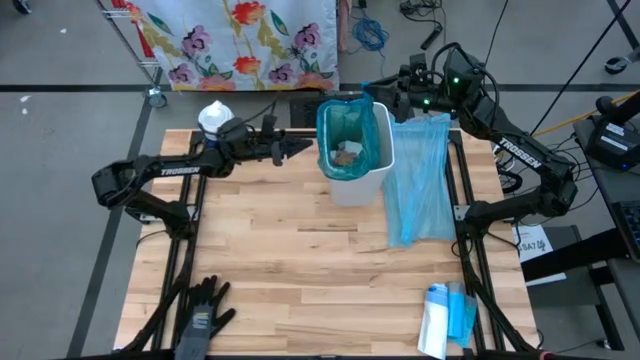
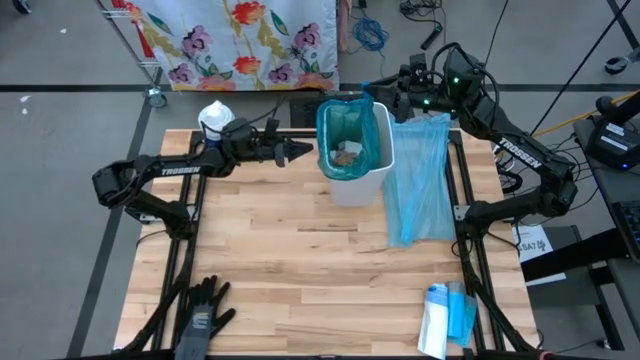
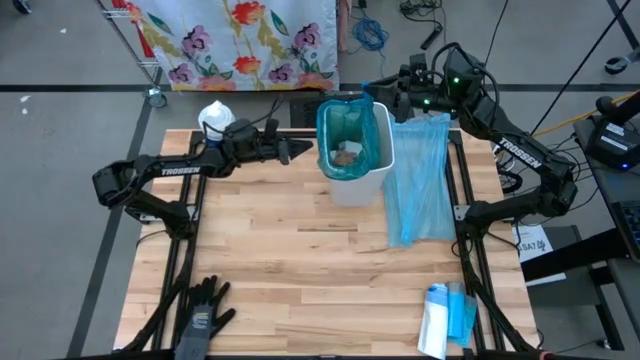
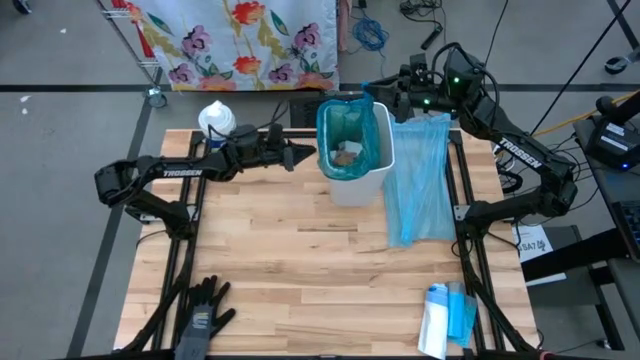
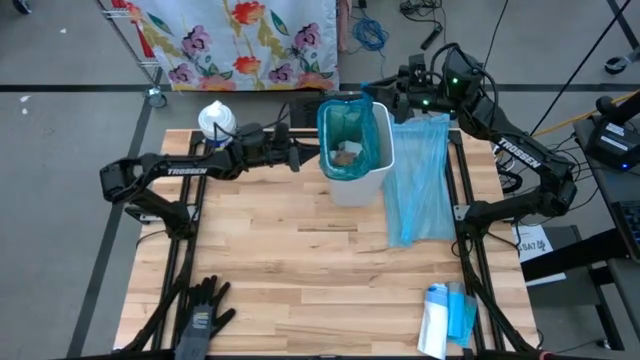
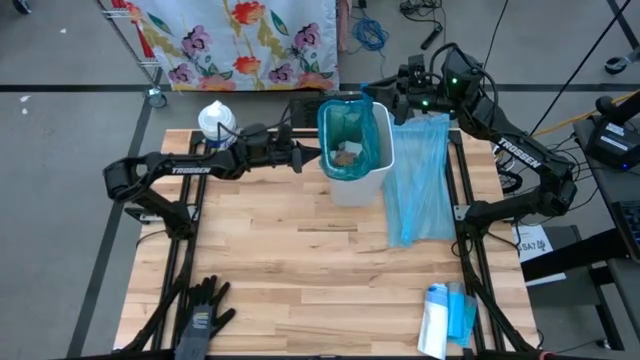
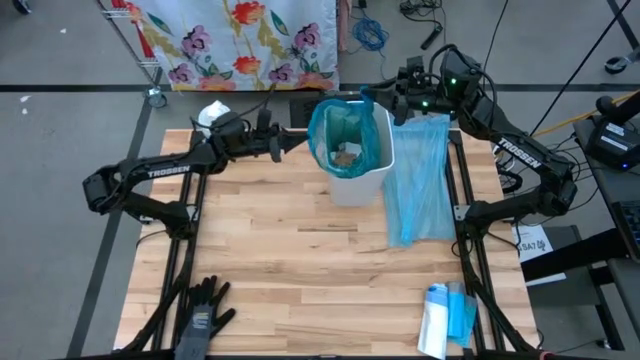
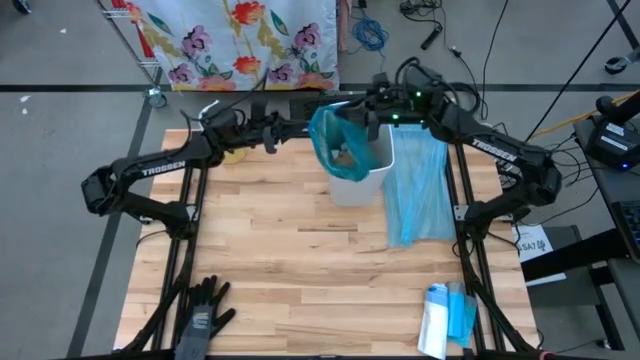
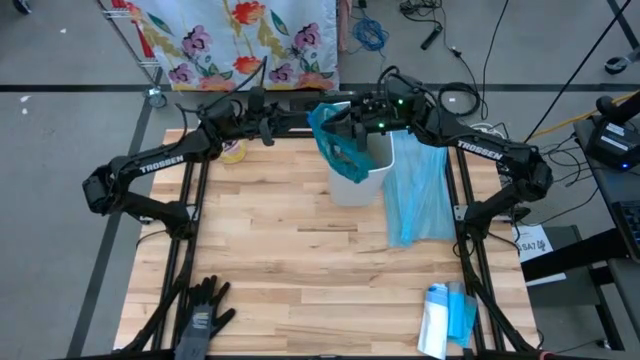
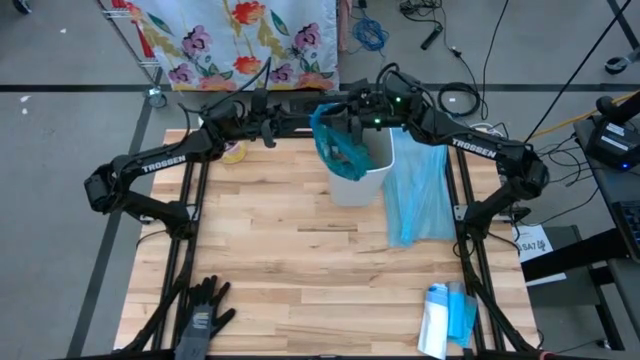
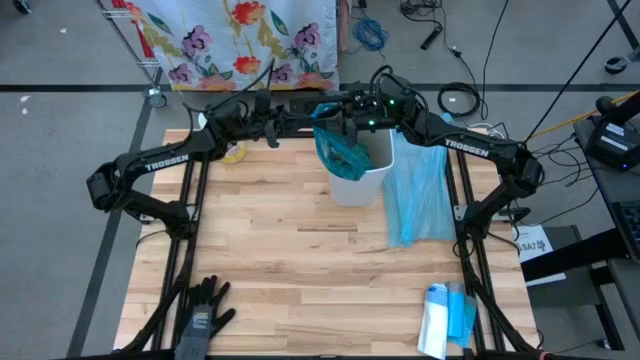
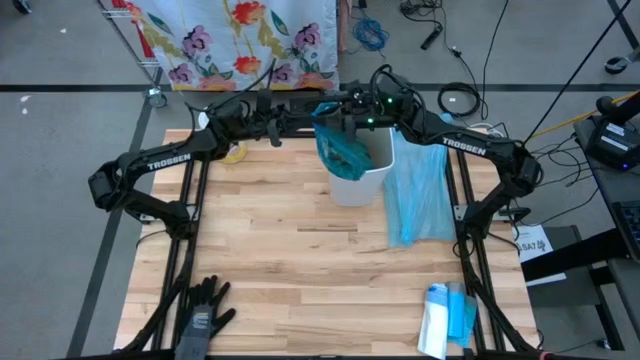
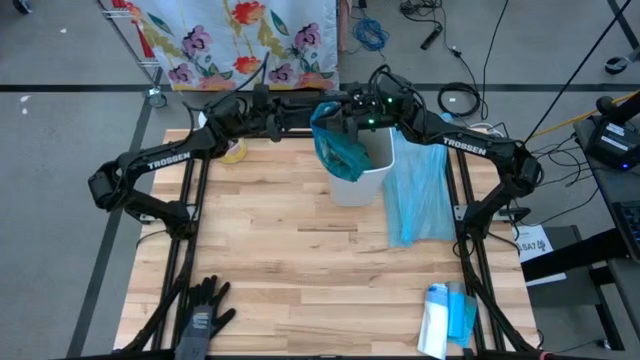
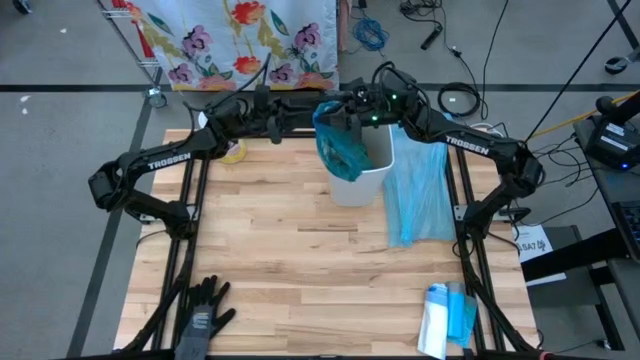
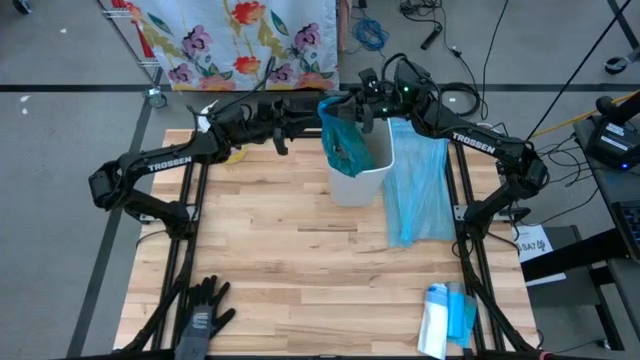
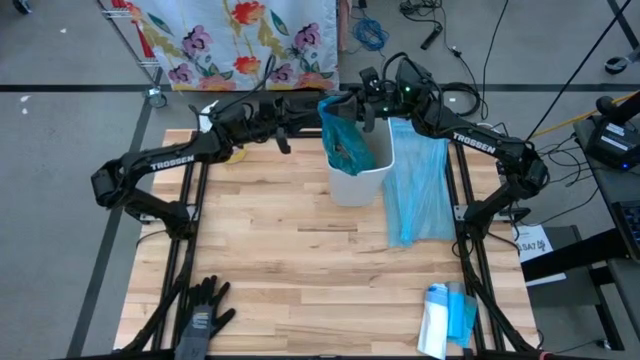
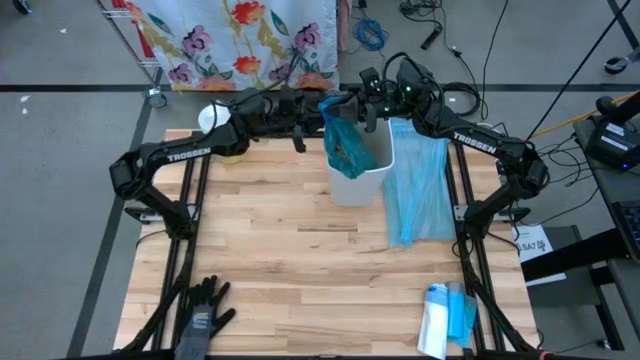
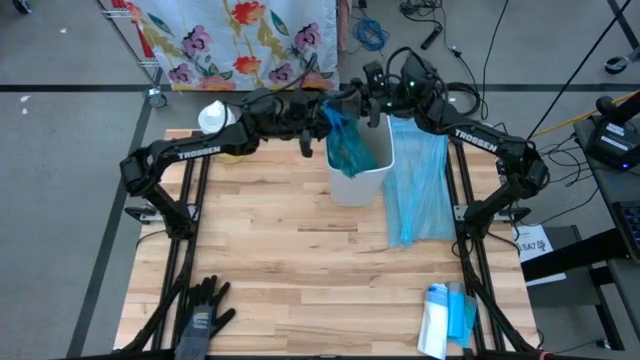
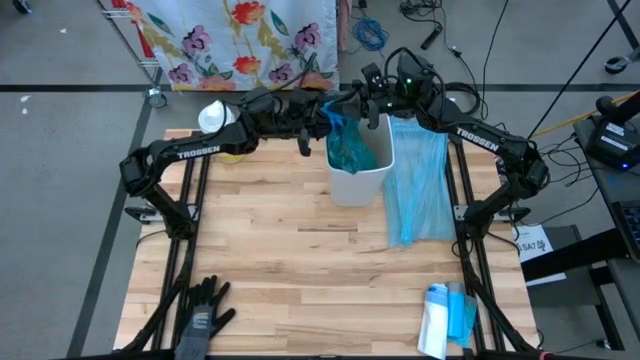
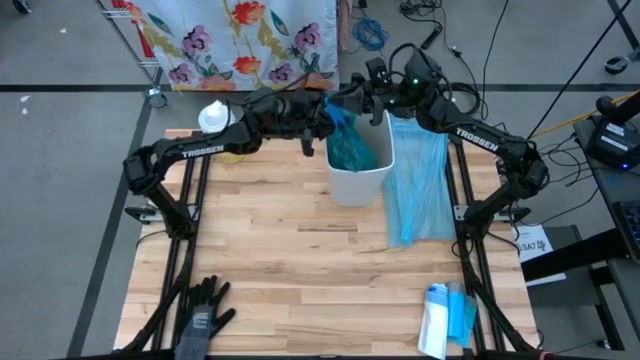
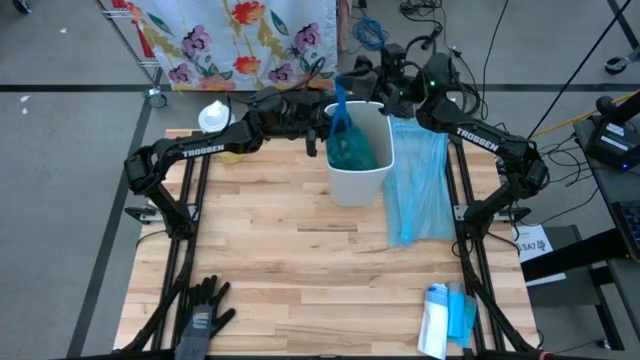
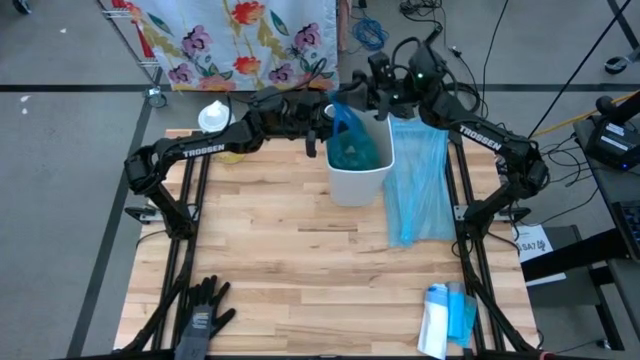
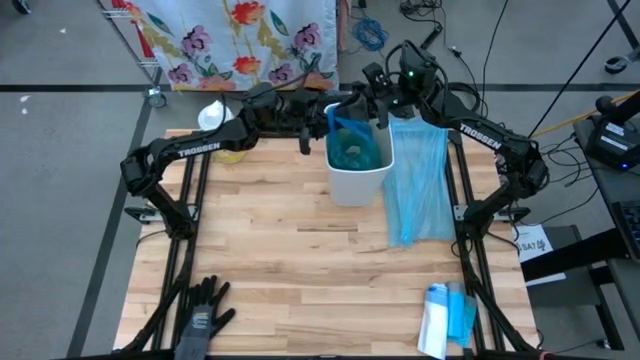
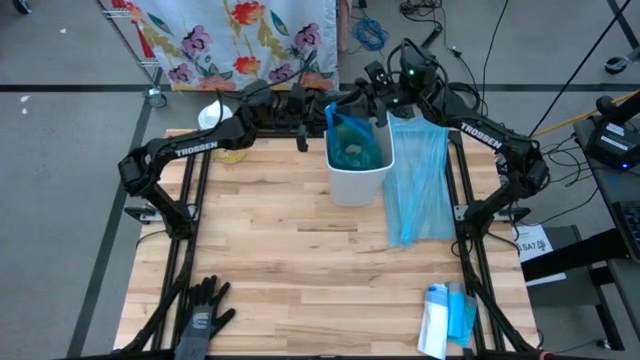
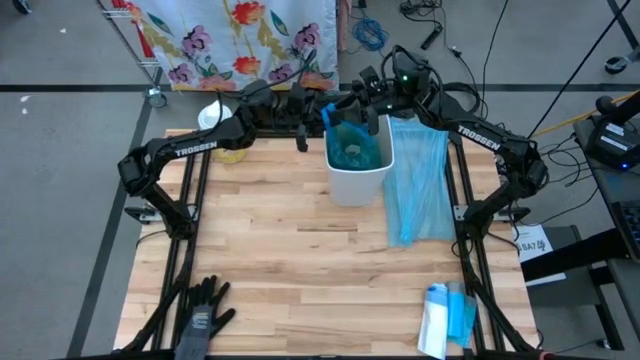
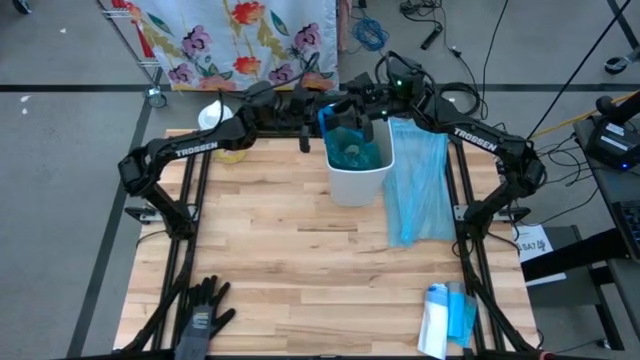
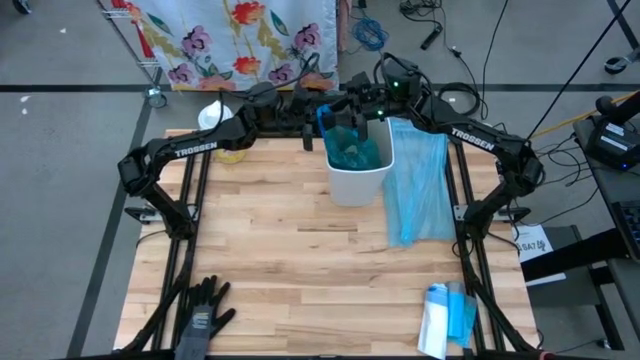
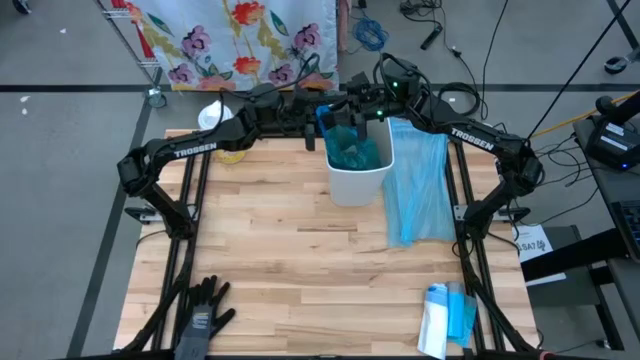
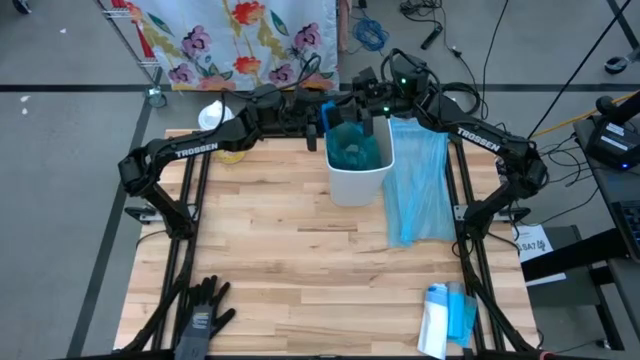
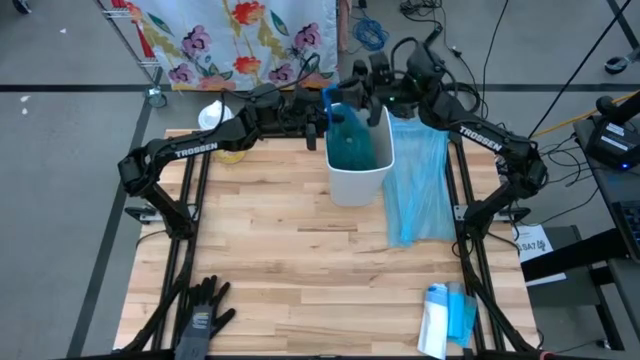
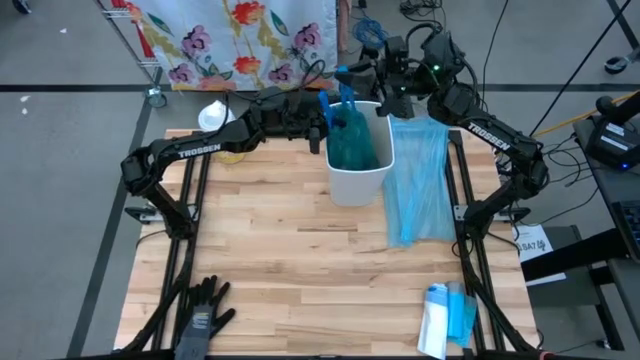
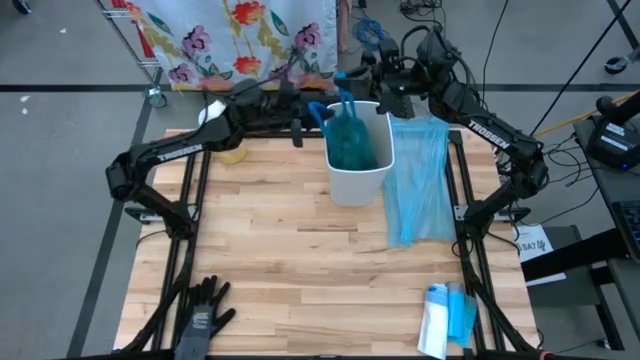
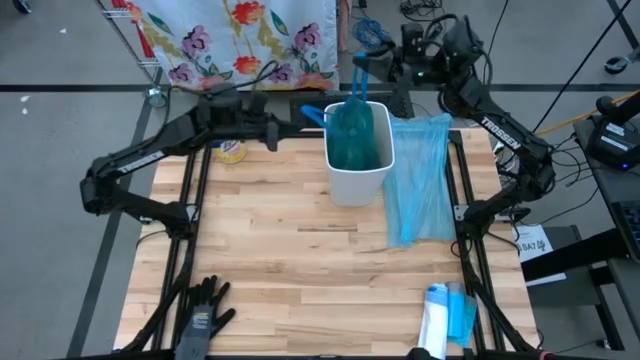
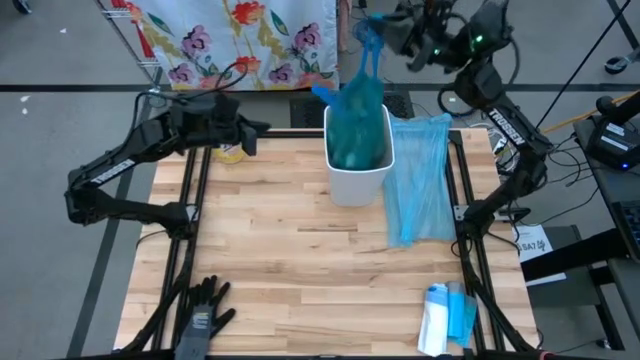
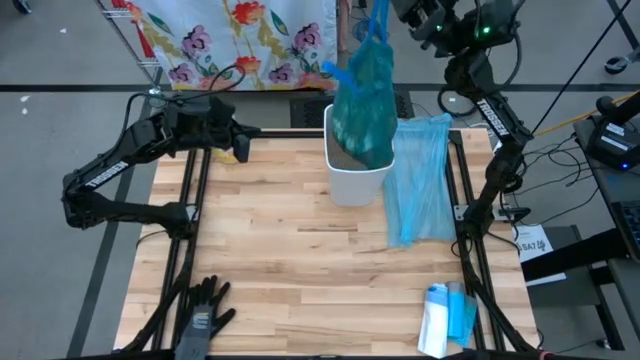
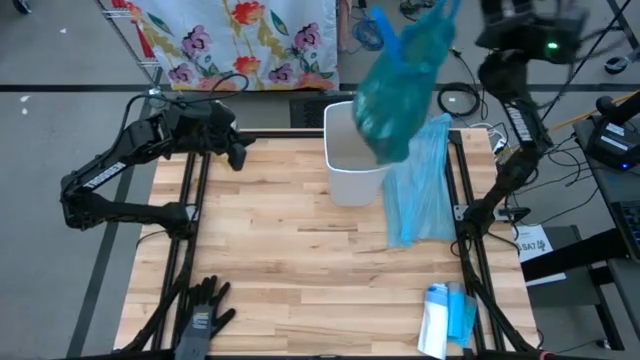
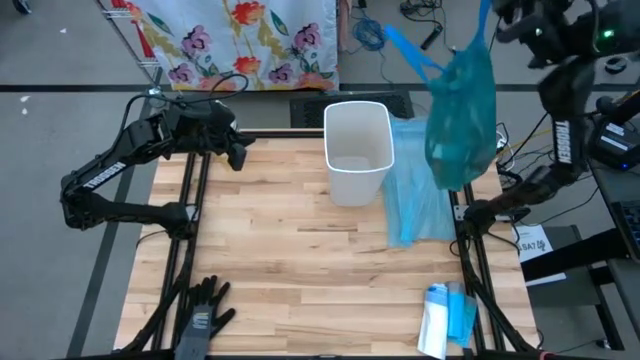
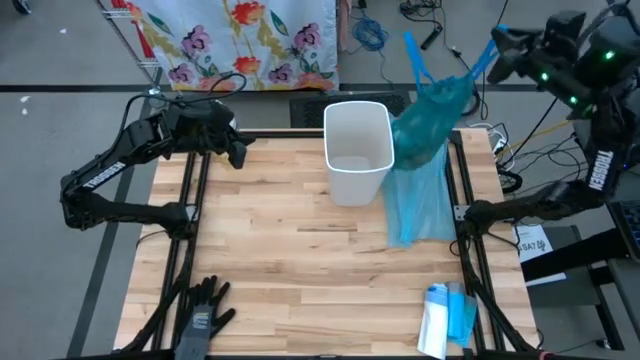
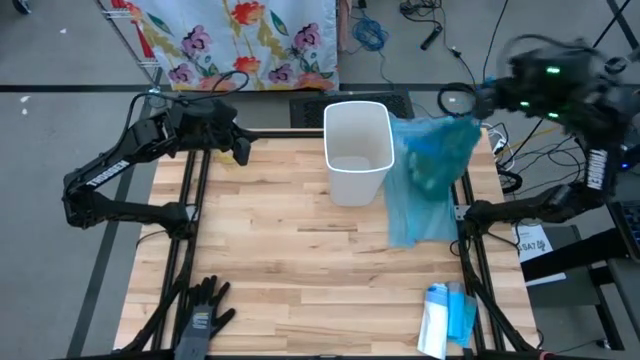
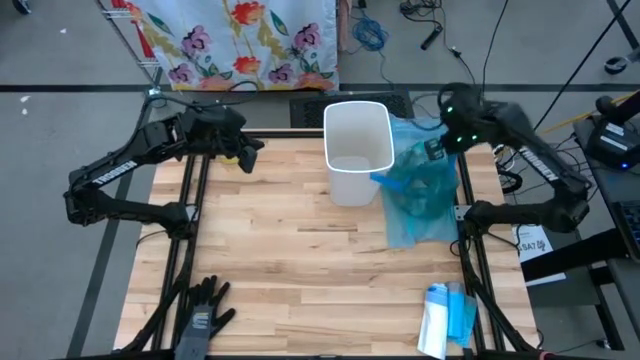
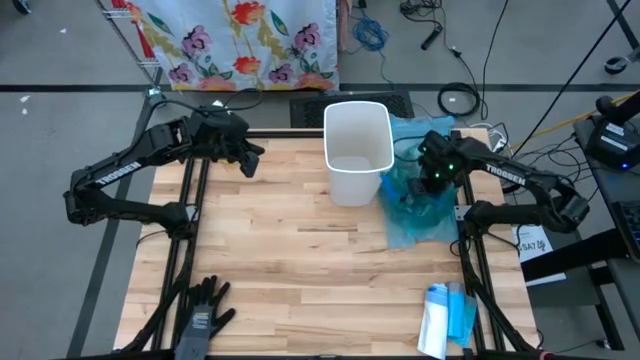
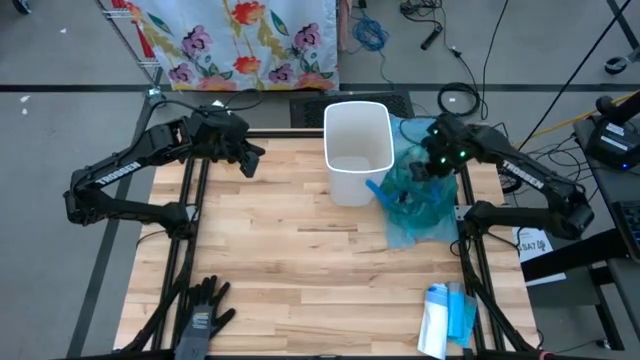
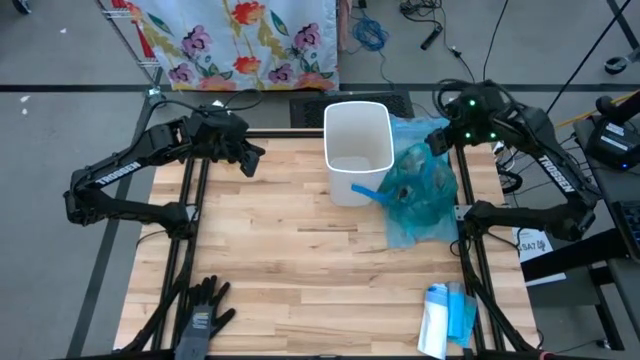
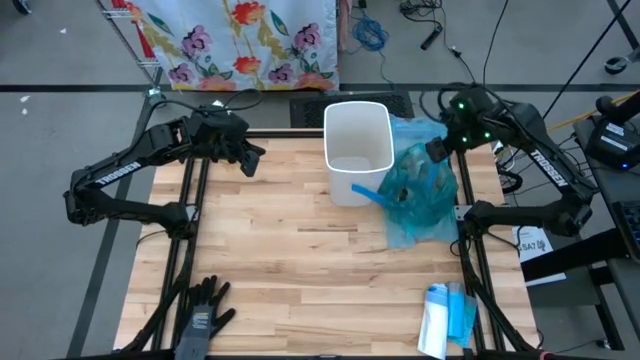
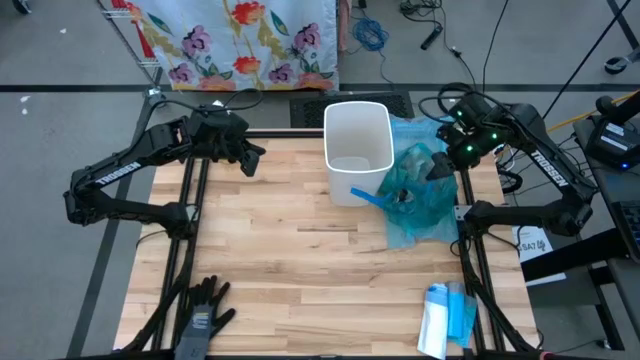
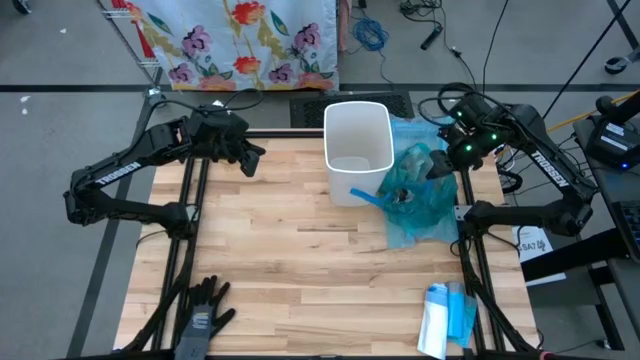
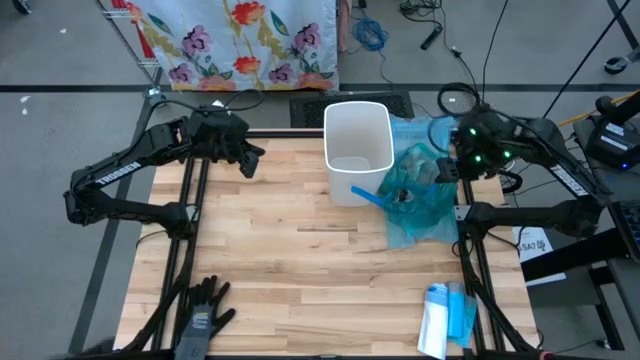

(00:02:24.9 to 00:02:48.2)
Task: place trash/remove bag and relplace
Remove the trash bag from the trash bin
